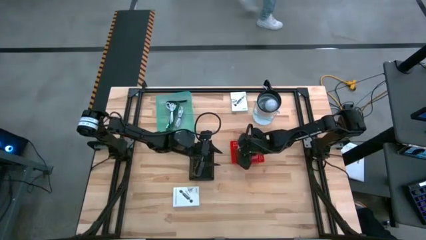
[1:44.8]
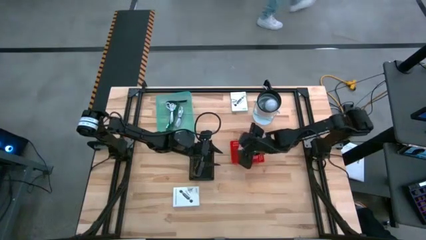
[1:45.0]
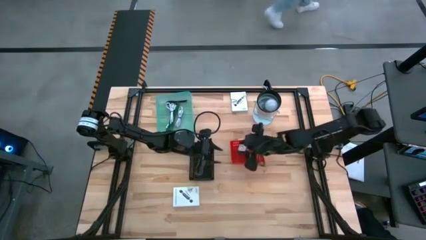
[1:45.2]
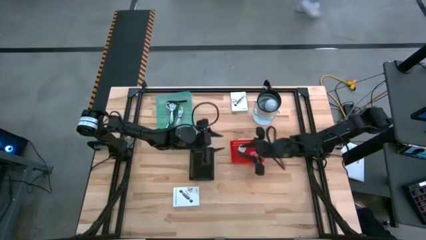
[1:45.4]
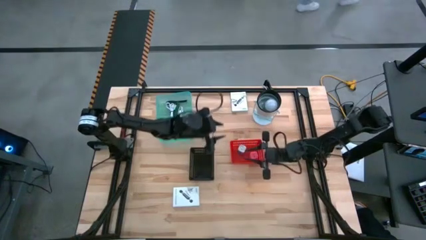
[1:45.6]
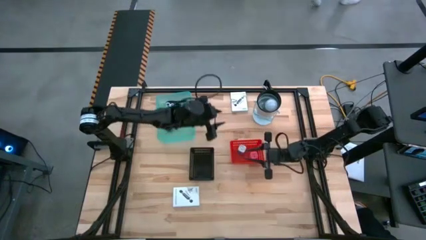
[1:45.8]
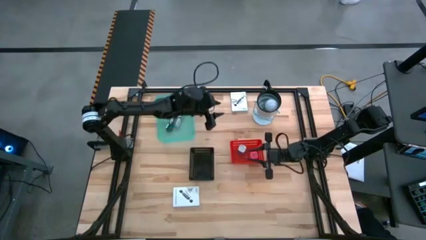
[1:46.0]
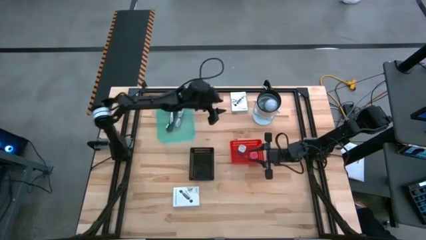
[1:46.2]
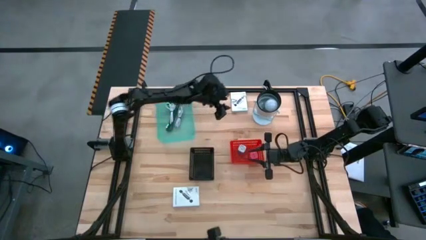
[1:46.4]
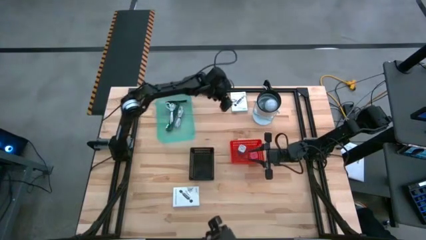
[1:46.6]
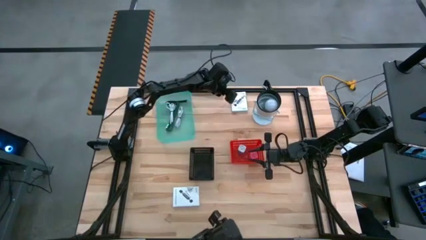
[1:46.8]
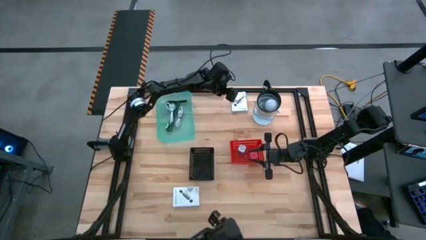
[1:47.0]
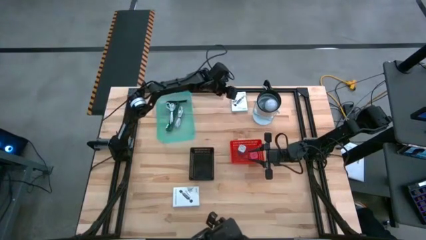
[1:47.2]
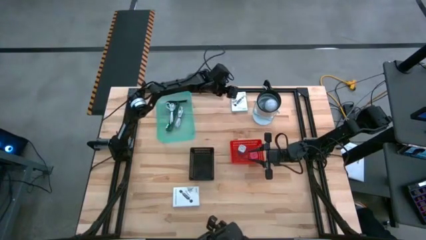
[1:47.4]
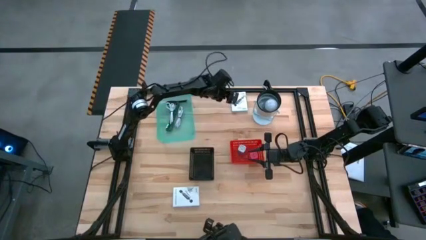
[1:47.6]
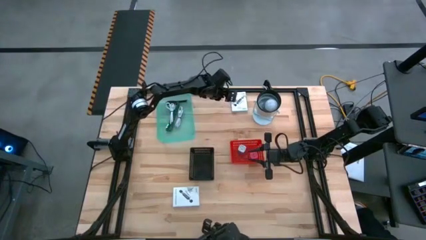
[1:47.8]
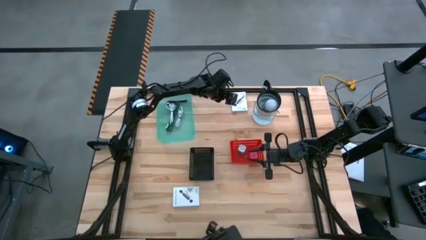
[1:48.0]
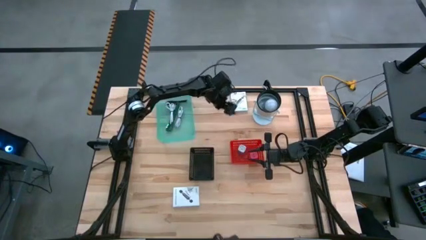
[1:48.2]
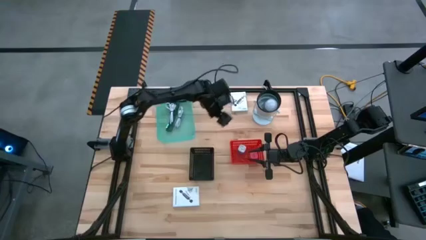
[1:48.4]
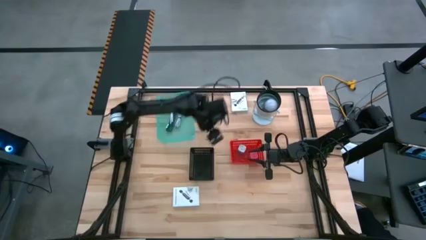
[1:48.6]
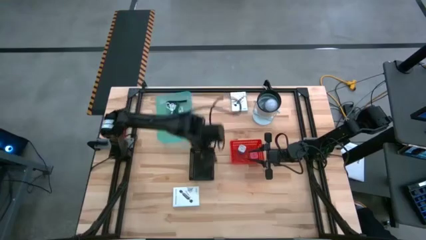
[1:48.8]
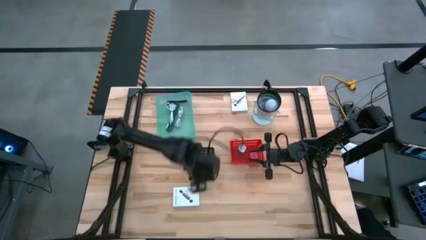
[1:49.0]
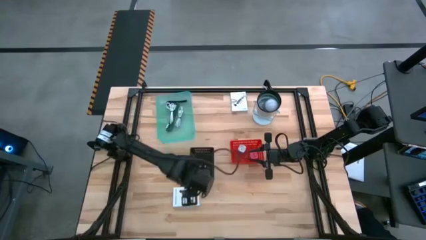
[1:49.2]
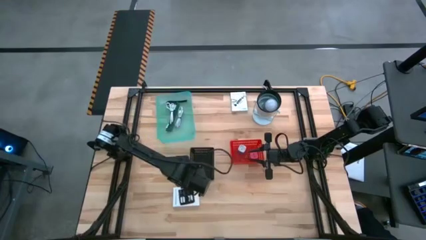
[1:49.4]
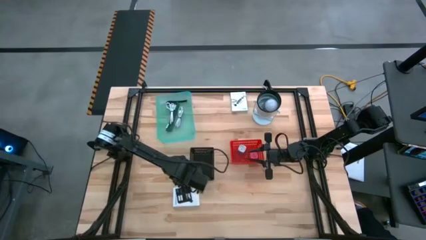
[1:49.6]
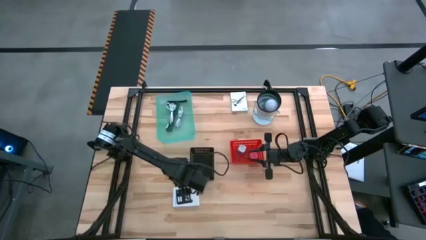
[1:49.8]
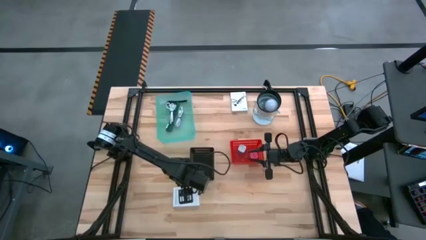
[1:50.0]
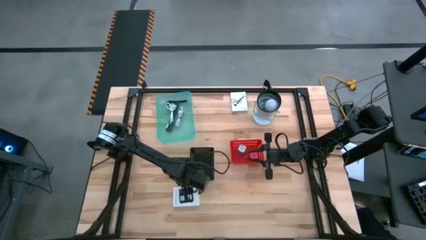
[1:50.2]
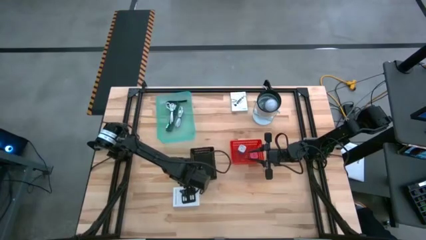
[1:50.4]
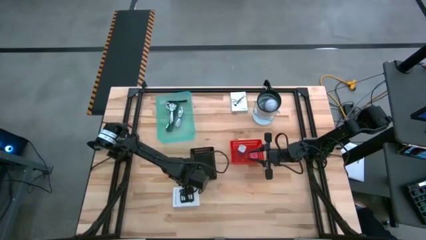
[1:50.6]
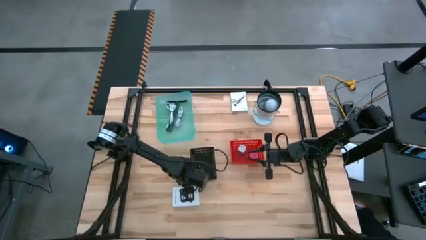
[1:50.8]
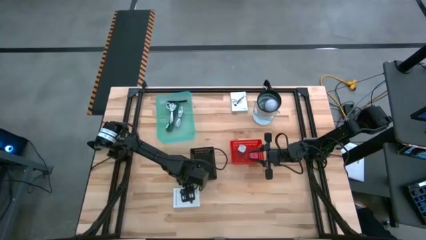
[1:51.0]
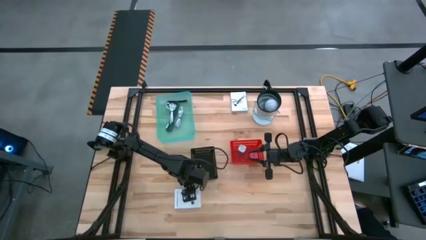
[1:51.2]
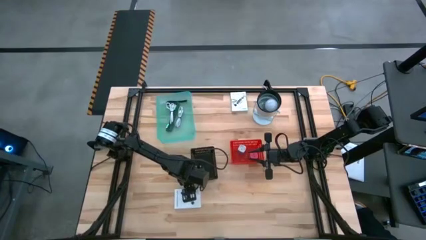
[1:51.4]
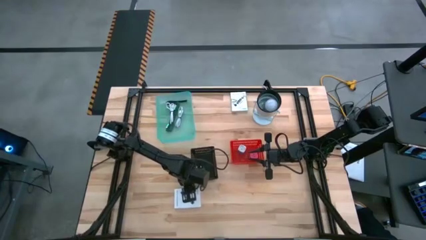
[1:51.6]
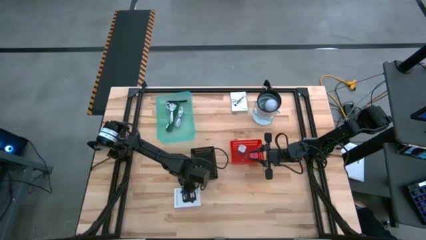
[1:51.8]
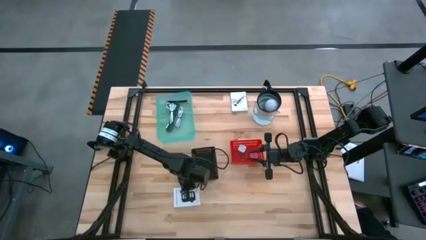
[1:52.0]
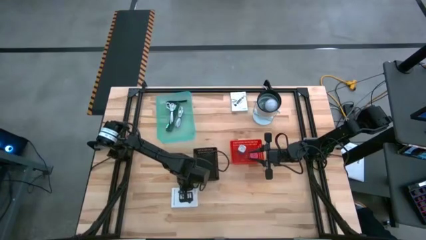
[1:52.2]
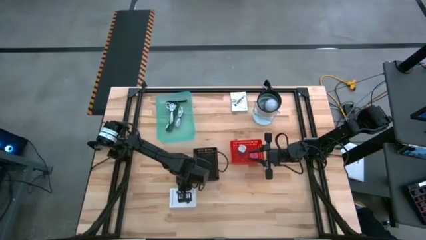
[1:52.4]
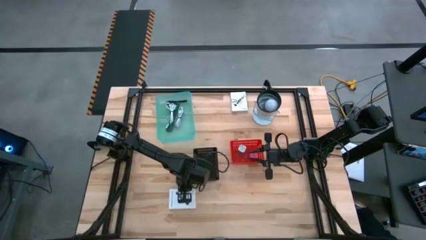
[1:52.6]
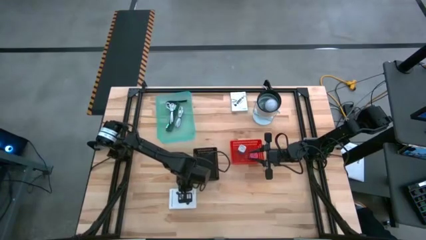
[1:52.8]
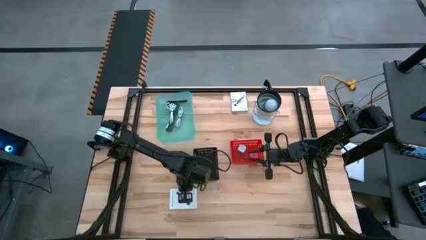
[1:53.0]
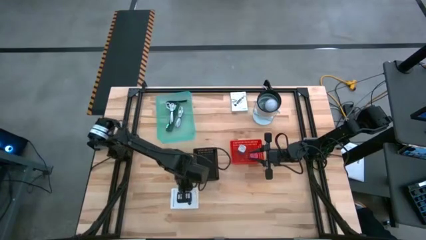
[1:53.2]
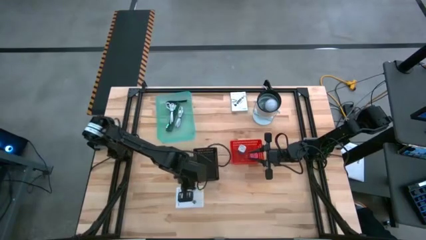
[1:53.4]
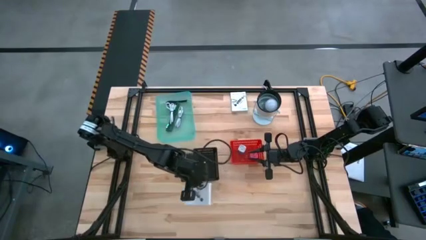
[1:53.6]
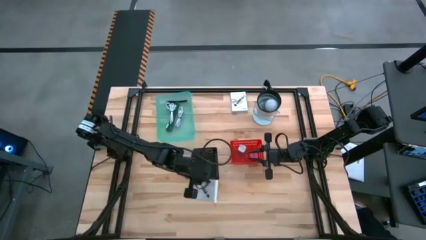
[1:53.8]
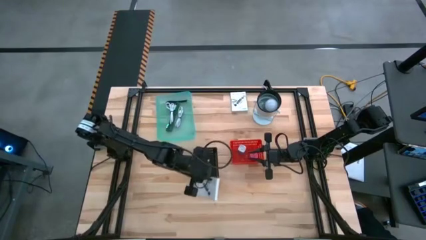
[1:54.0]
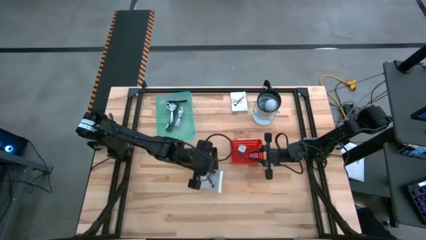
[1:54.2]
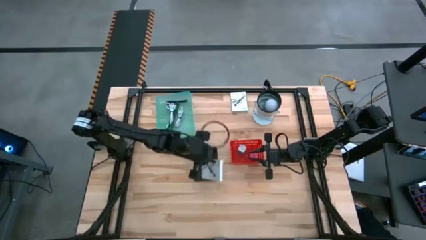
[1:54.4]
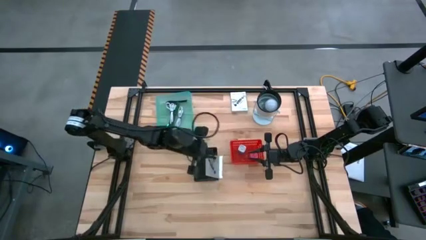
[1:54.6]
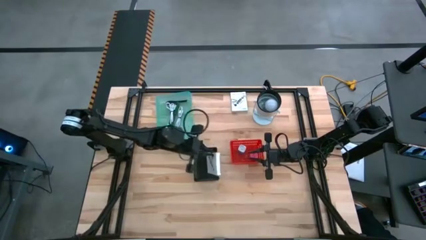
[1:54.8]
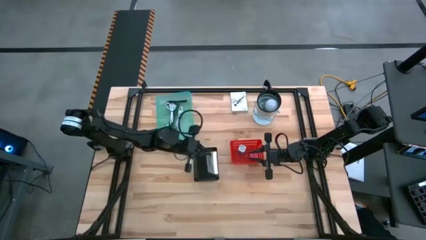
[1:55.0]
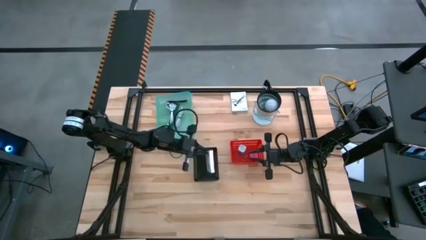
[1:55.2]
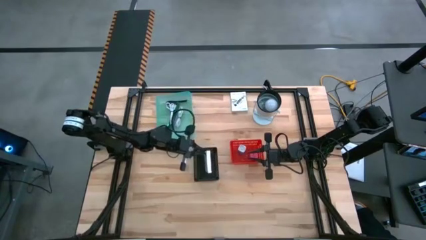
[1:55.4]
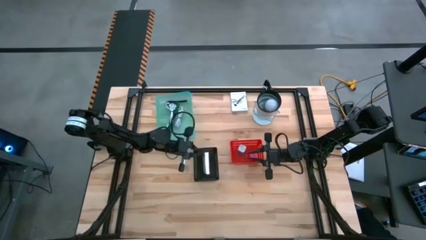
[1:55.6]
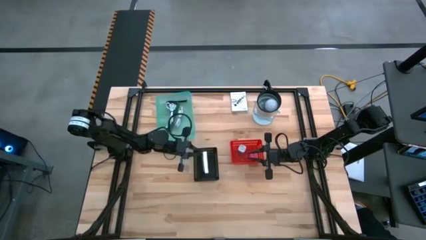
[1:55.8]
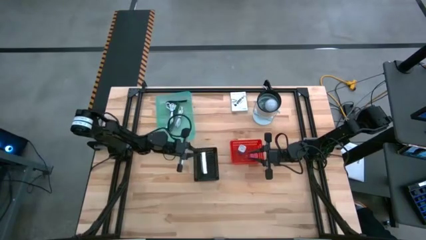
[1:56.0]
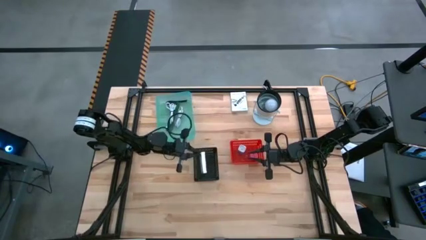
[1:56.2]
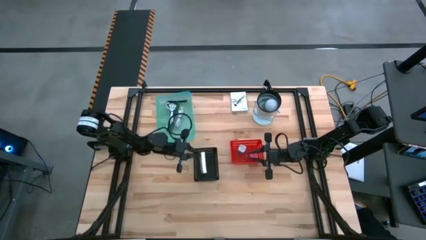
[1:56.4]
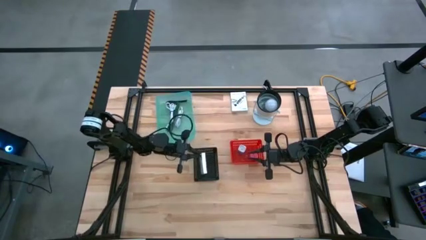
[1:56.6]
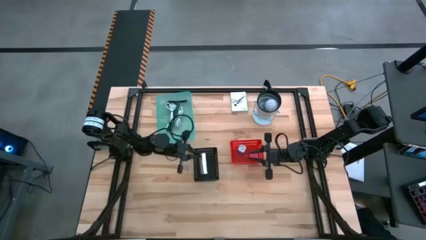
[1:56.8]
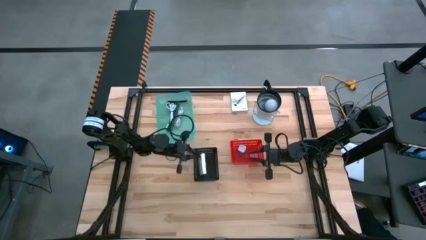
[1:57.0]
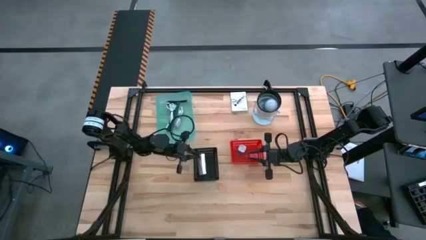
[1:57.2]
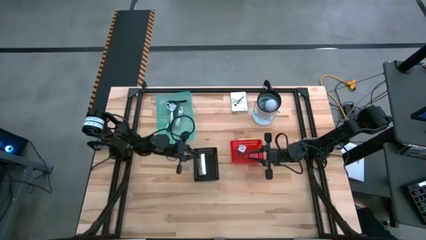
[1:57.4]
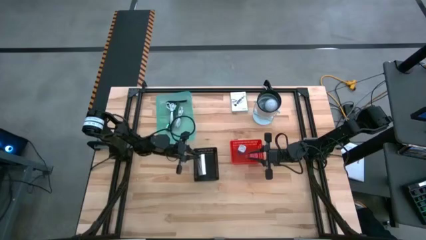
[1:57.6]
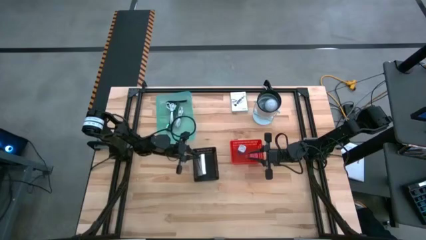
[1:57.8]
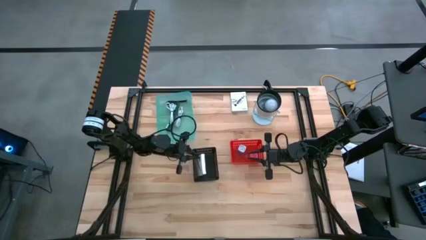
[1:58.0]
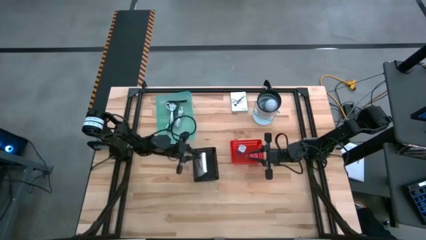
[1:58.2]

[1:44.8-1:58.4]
Task: Pick and place items into bin
Put the bottom white card reader box into the black bin

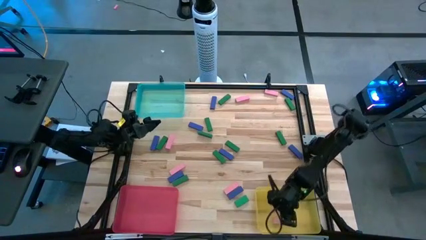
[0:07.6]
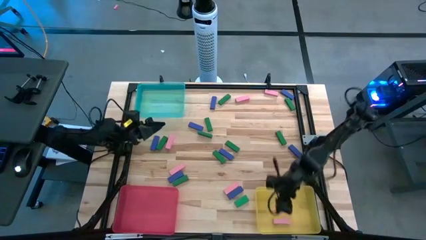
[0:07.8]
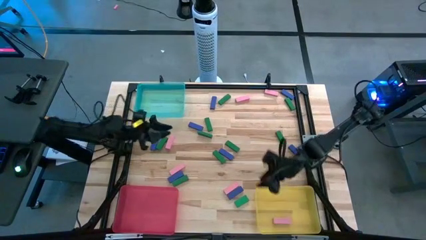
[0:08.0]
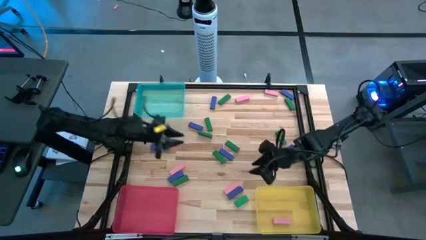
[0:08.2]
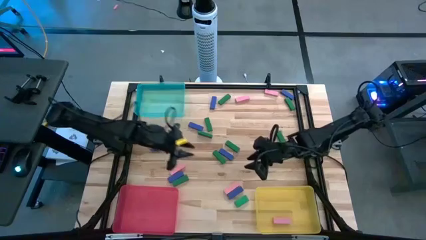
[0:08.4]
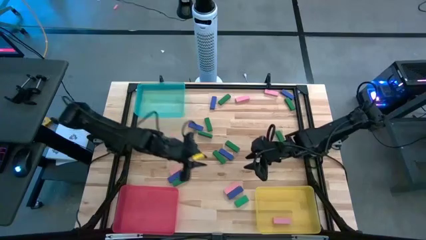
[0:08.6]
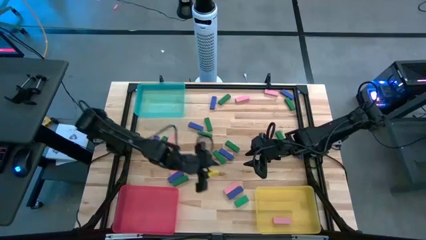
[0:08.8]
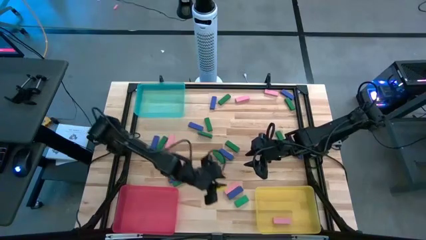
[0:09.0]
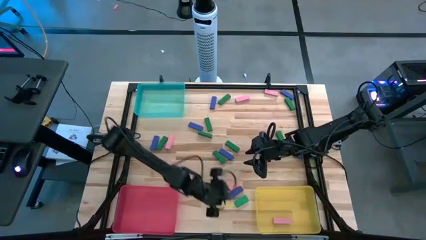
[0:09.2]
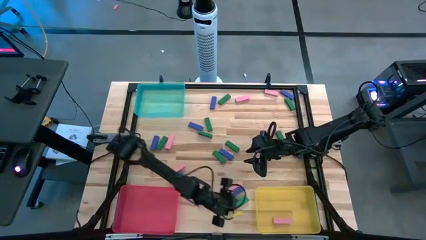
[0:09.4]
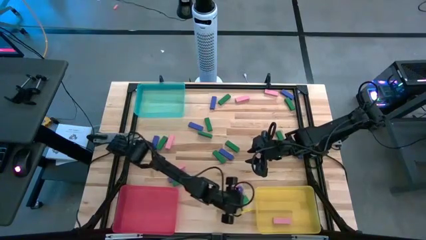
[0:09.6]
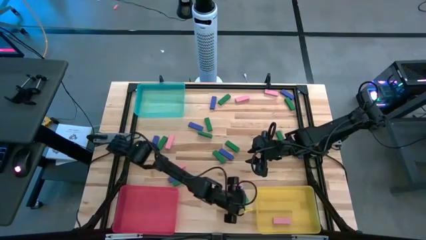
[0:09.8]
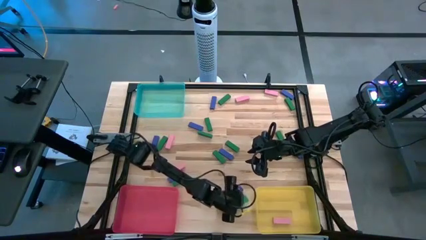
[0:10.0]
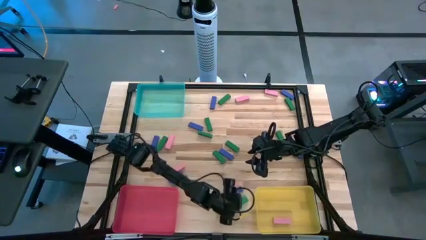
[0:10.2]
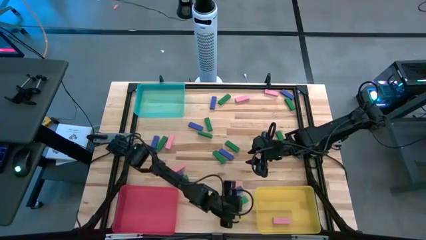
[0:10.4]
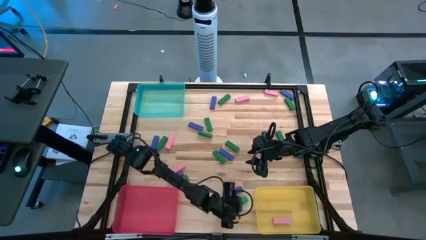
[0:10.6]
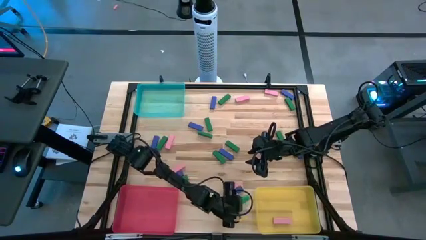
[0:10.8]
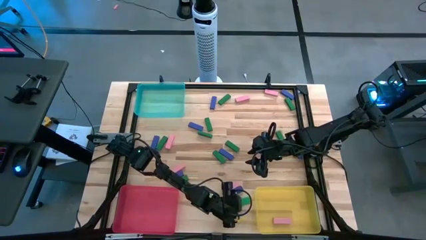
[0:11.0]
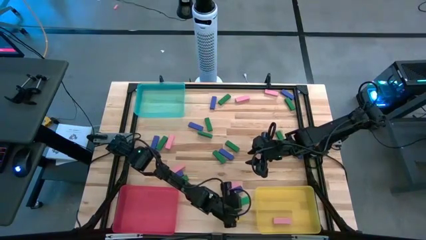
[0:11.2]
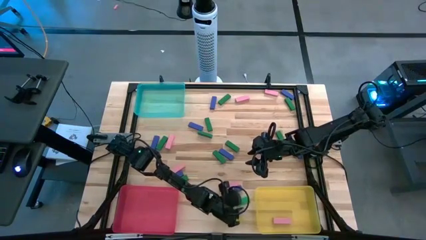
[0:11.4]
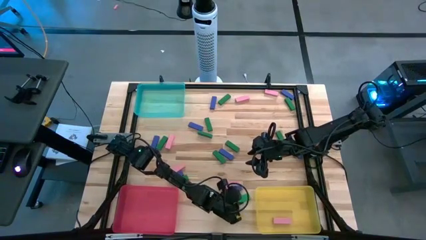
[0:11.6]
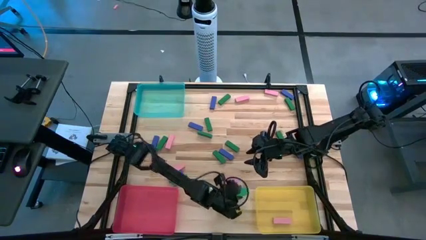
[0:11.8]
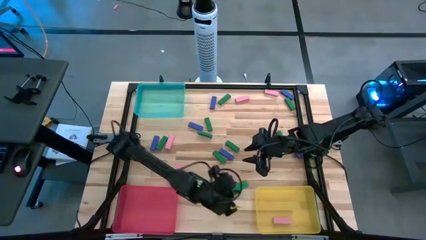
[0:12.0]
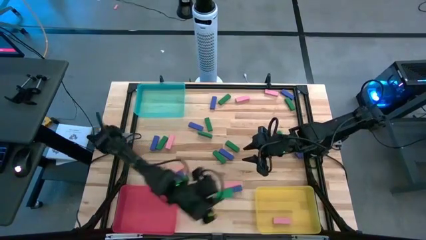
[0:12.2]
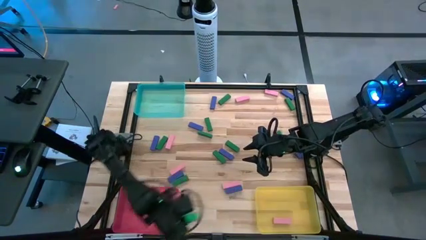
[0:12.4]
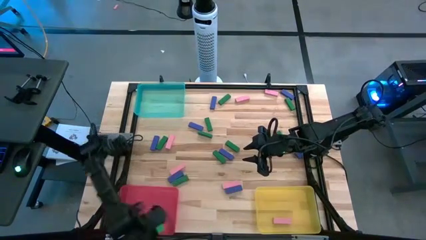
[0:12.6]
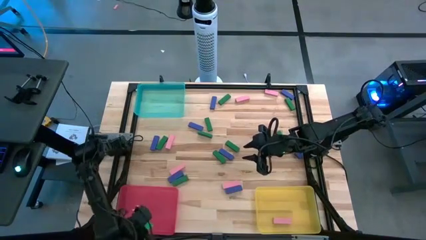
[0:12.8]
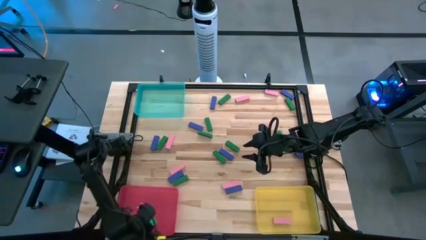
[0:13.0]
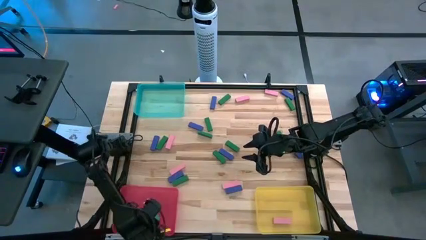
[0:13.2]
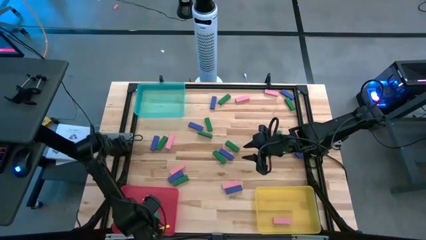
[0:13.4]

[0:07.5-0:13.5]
Task: Sort blocks
Put the green block into the red bin
